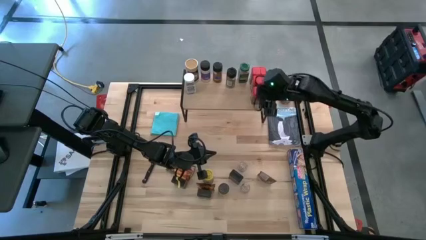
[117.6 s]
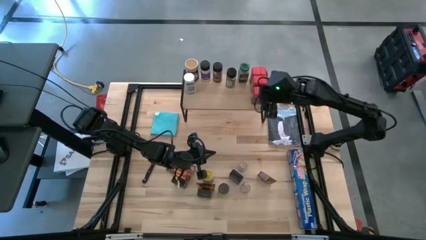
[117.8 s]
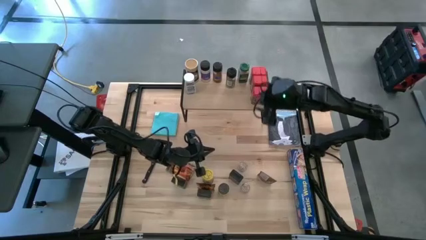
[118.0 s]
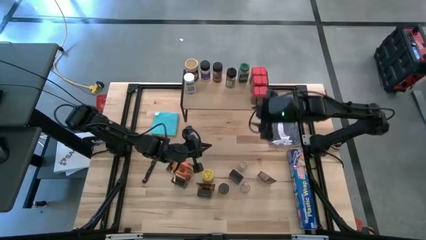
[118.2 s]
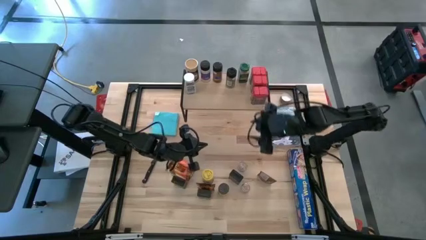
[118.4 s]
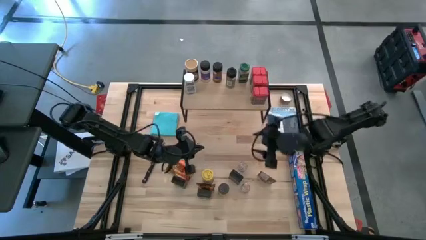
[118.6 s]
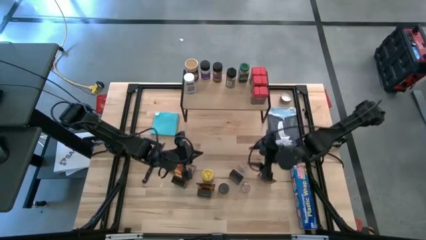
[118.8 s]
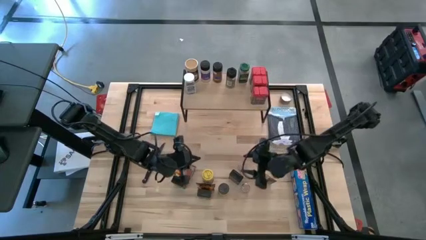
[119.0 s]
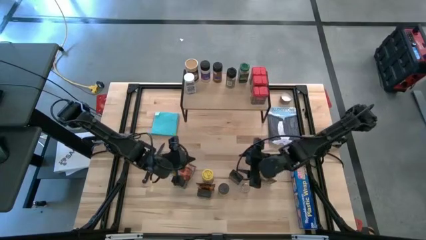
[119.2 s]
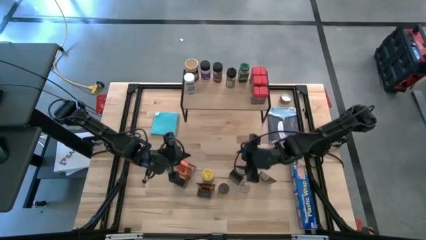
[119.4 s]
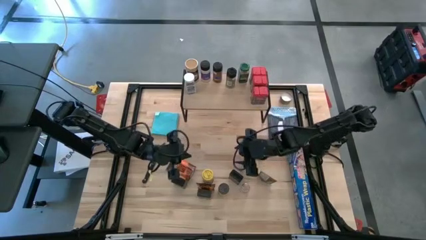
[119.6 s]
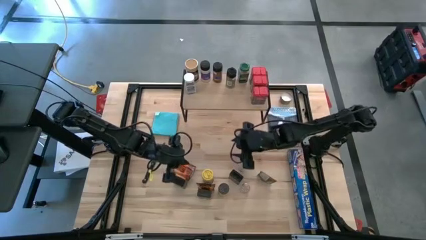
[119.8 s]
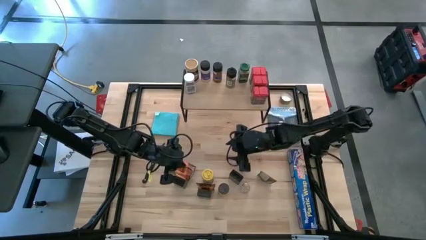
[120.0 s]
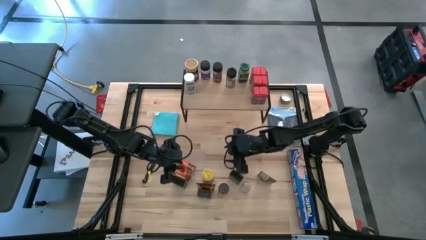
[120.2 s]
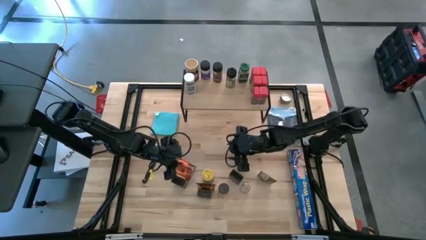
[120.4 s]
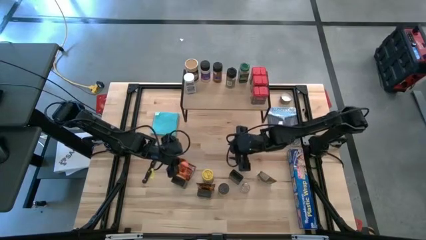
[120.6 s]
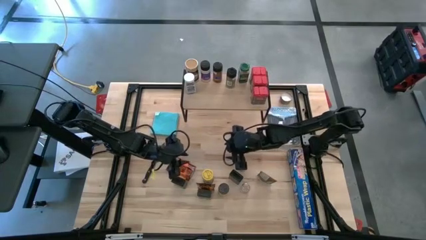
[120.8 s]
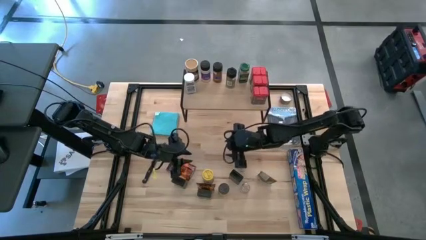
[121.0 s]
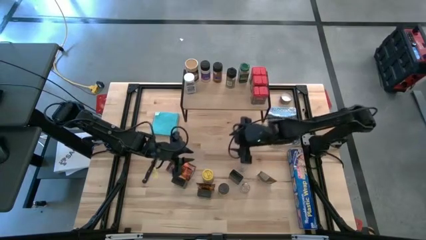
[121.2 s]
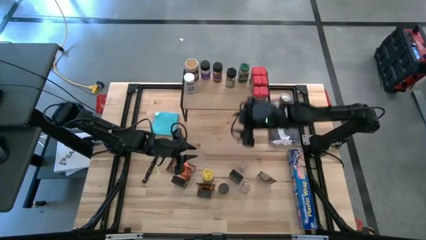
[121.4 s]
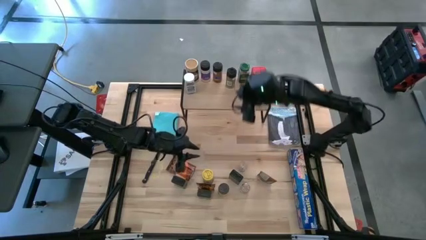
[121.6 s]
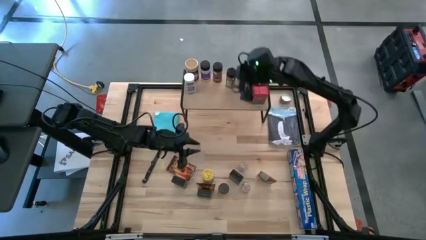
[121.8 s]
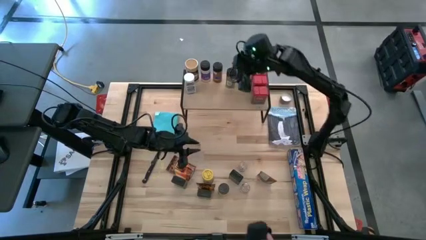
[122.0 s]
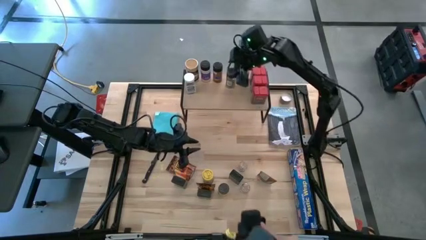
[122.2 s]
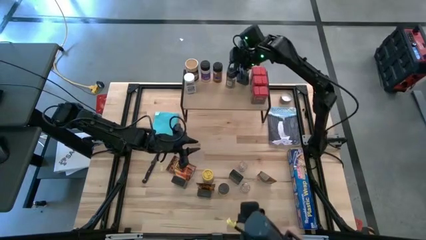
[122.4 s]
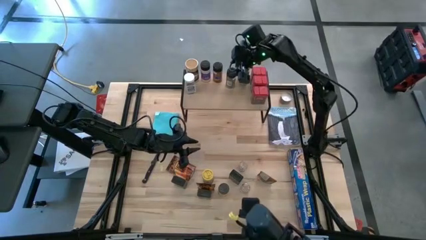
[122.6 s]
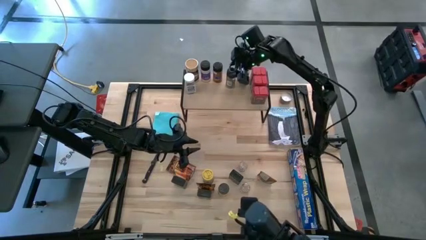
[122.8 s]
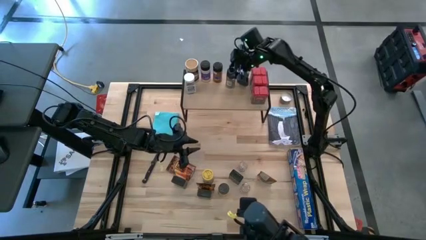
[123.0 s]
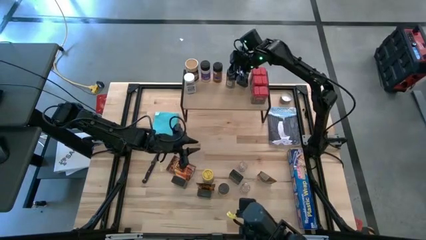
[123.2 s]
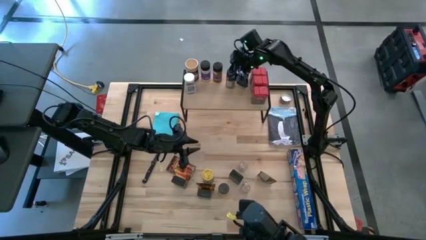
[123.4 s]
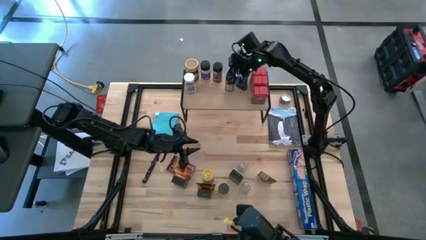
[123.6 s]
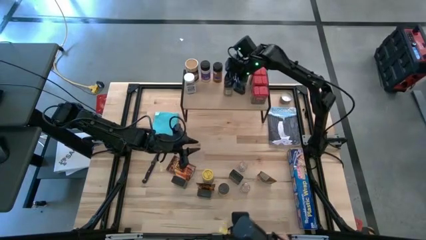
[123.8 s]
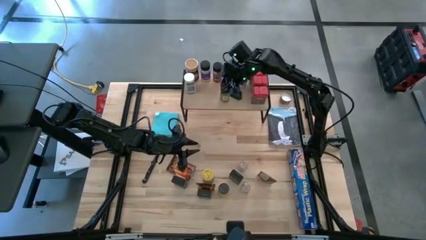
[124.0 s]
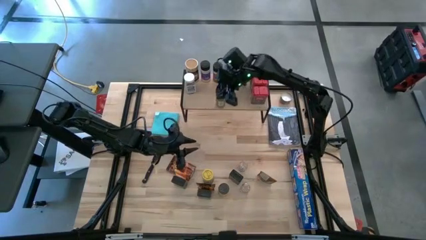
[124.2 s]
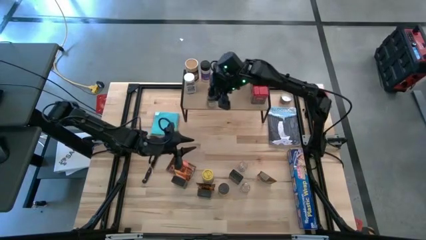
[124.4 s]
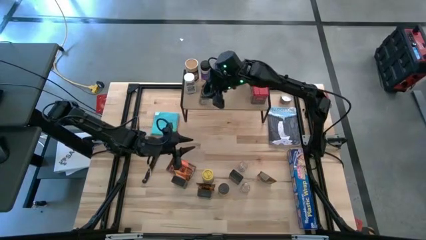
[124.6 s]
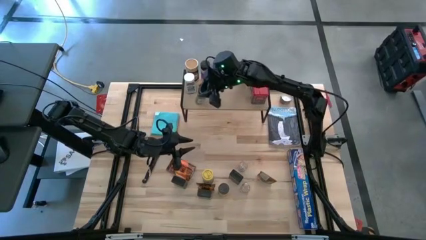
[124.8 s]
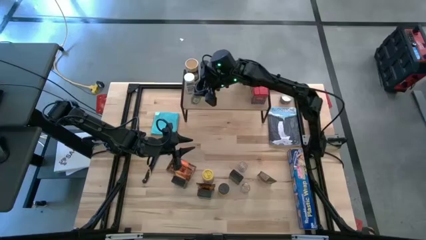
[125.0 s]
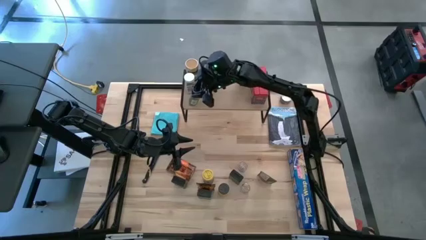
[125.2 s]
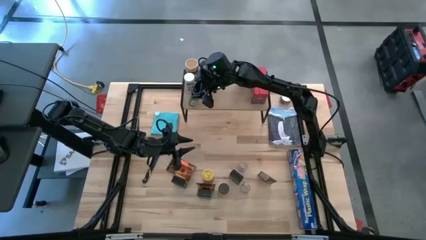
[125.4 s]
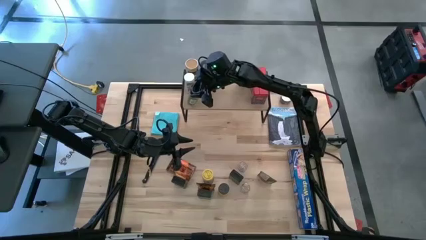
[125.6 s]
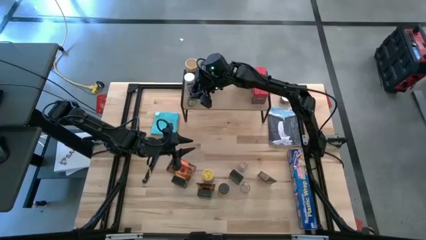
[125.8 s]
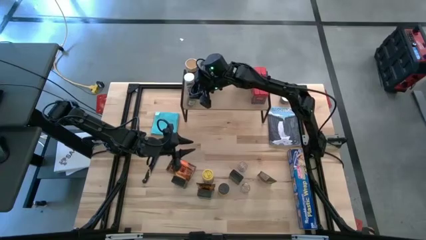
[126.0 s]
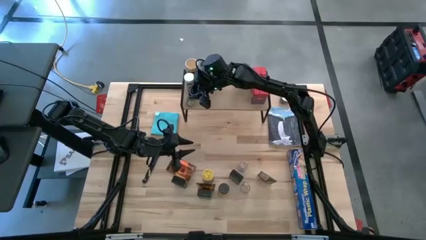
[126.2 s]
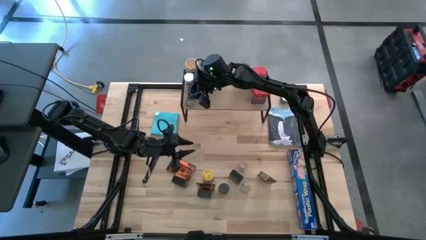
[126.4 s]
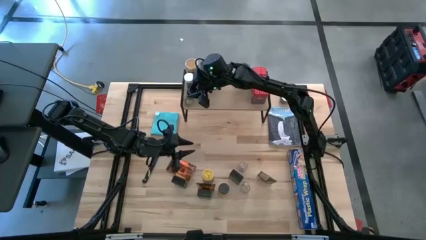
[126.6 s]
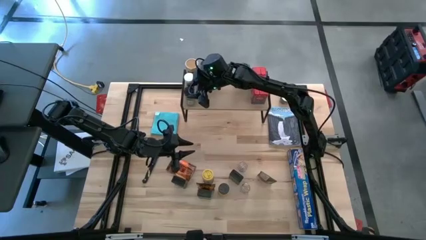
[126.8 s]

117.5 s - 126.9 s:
Task: Shelf spices
Adjust the black seasoning bottle on the shelf

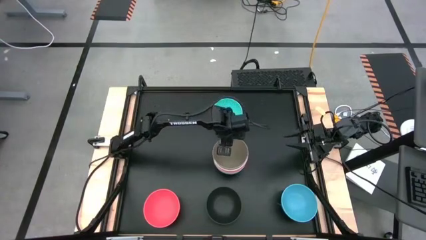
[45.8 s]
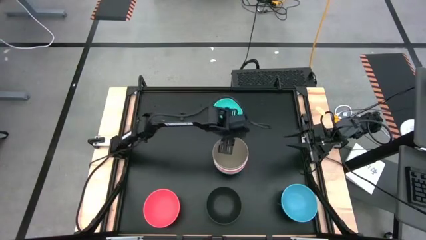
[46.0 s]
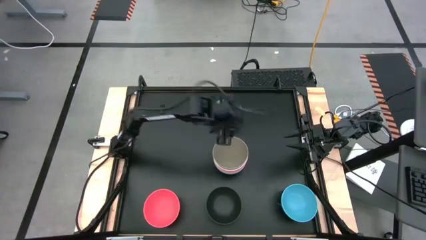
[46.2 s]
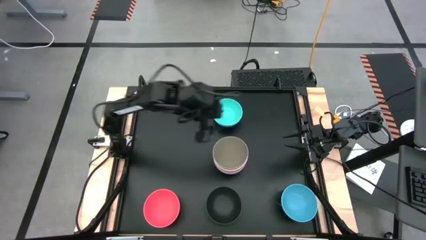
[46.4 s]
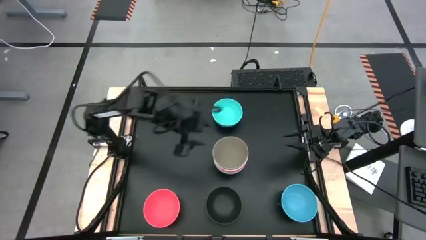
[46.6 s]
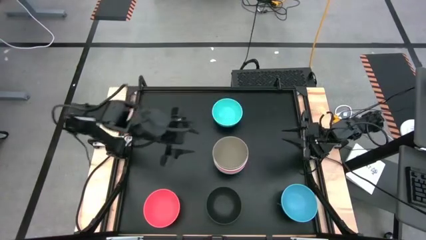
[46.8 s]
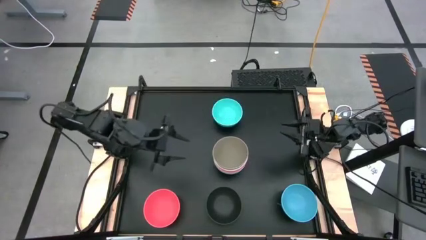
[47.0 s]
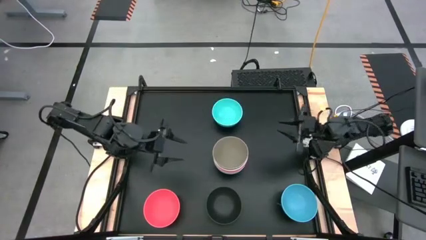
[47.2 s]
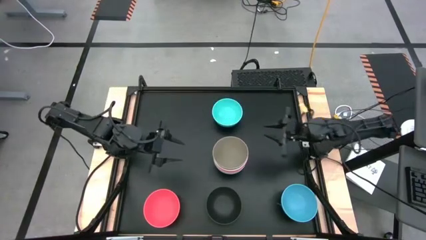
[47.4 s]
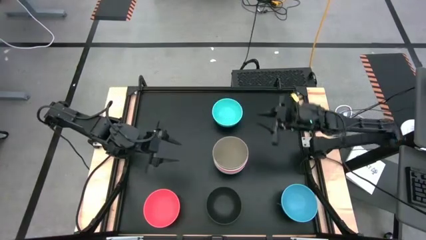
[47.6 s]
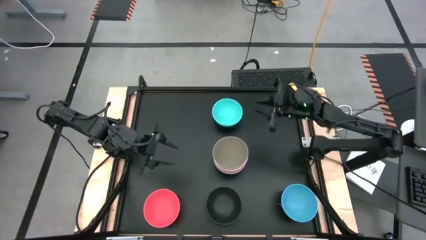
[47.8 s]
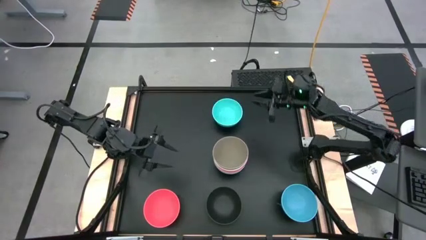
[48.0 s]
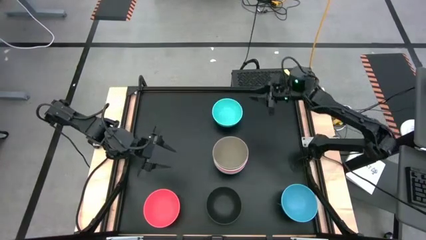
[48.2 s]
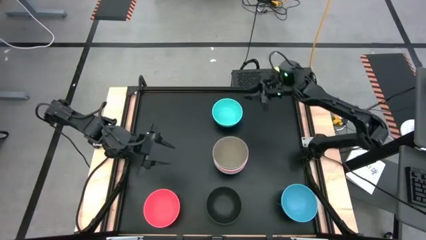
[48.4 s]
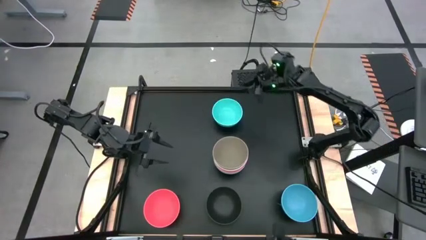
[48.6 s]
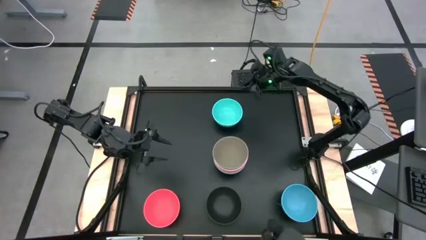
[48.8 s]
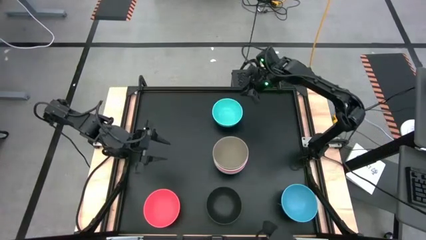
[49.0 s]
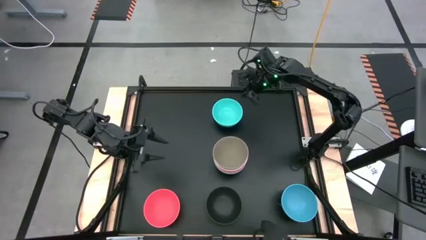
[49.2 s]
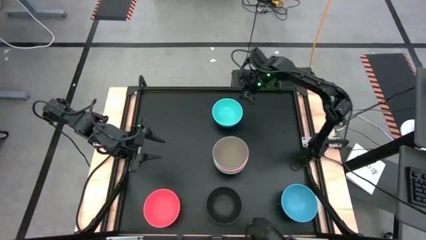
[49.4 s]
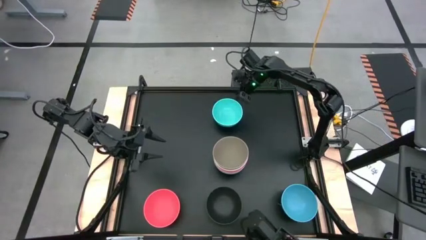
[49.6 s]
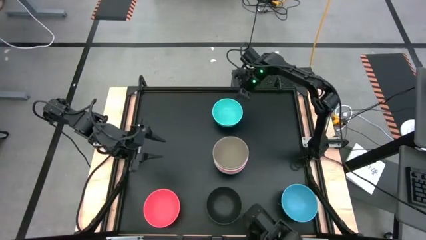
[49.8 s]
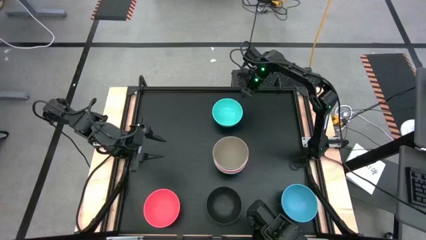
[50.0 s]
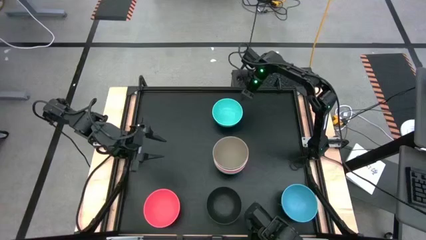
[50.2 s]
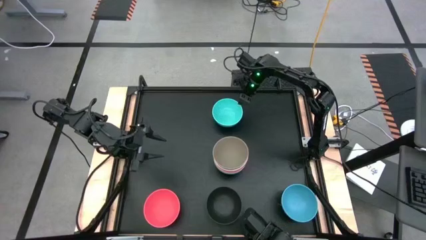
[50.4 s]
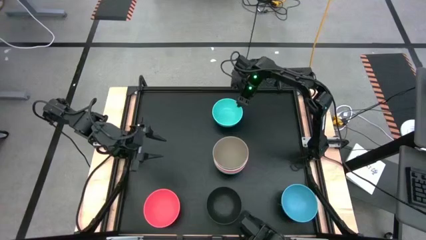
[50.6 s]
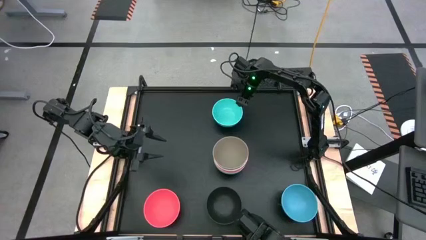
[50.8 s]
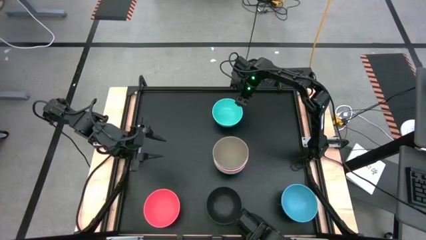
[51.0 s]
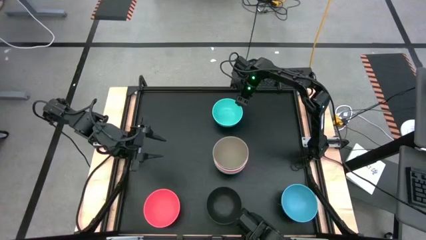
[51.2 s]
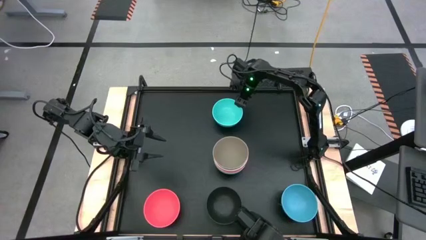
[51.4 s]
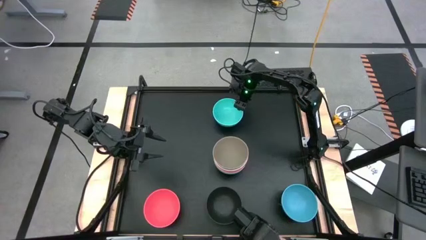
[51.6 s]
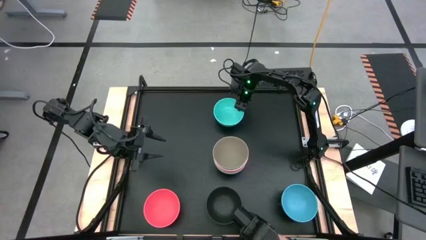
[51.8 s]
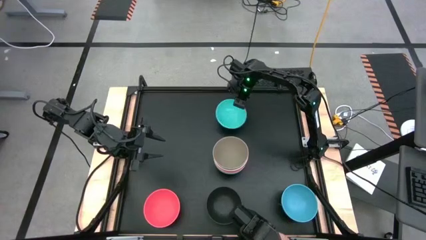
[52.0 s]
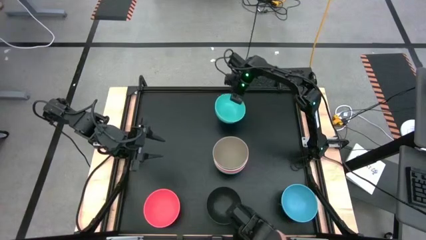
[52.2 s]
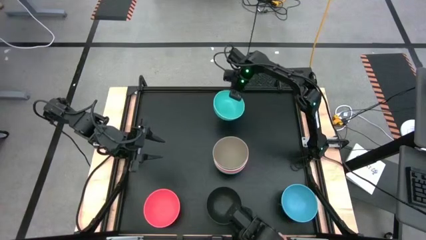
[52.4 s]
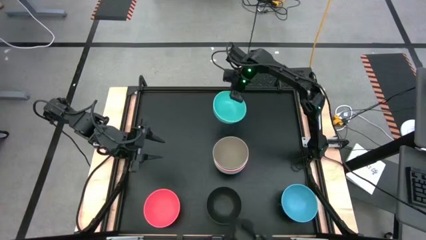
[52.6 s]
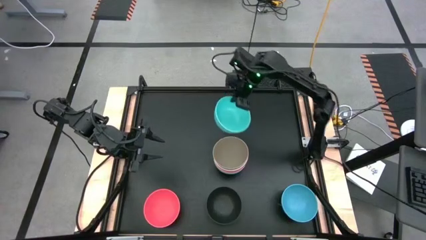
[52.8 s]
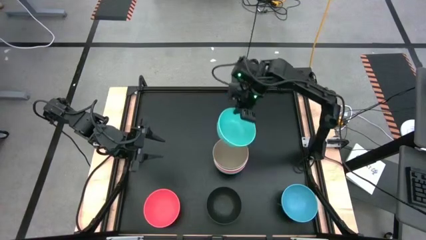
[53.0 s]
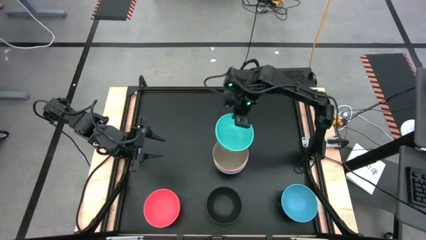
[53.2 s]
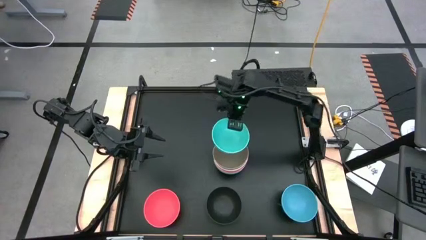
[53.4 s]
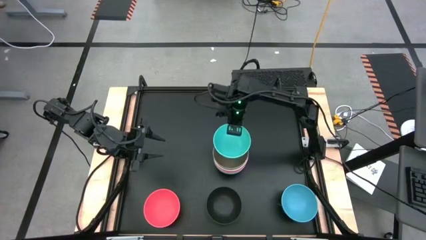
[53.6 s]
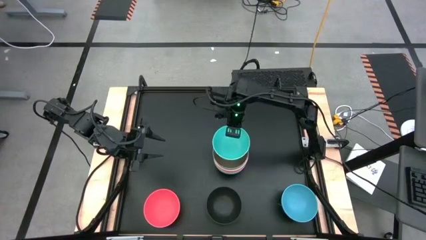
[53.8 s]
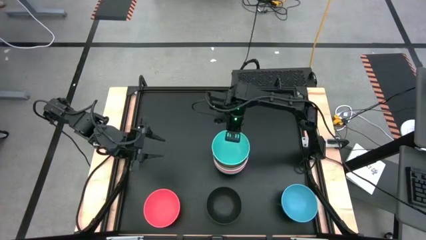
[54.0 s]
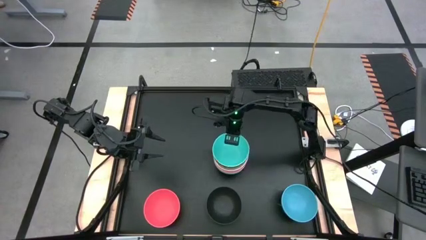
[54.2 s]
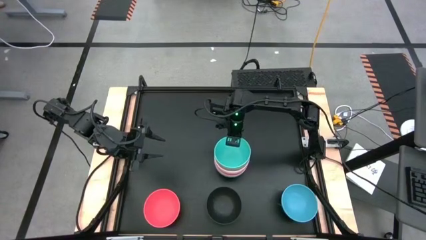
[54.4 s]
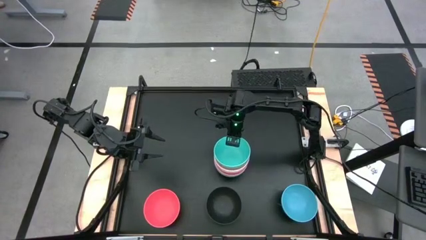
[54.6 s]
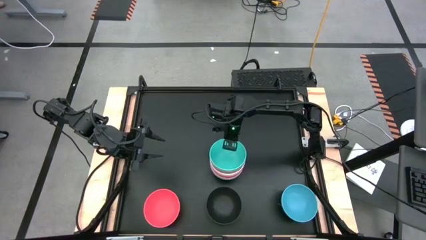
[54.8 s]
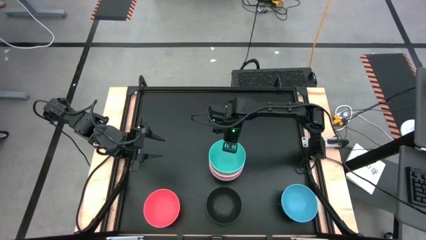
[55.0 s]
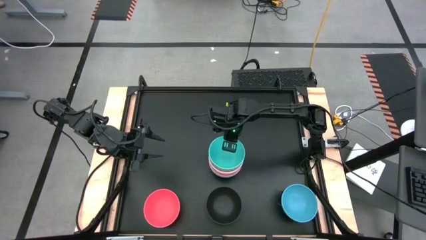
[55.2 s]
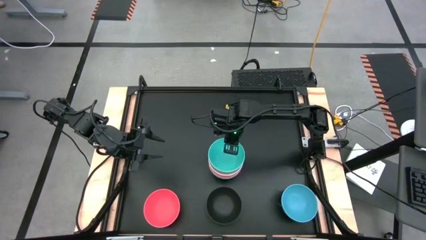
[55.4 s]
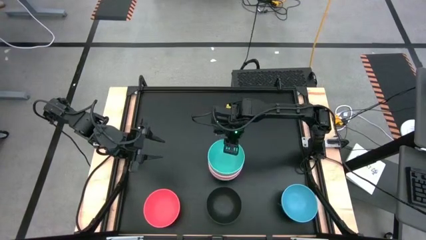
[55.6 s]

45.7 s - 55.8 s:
Task: Nest bowls inside each other
Stack the light blue bowl on top of the gray bowl
